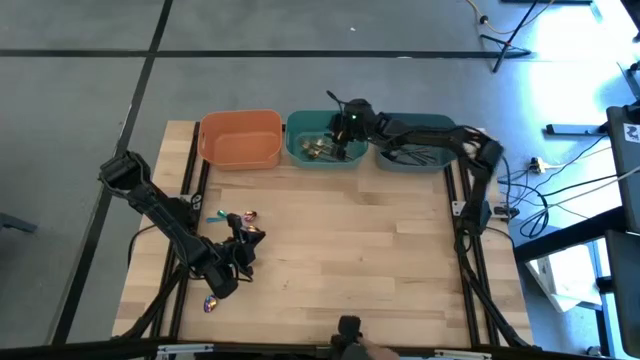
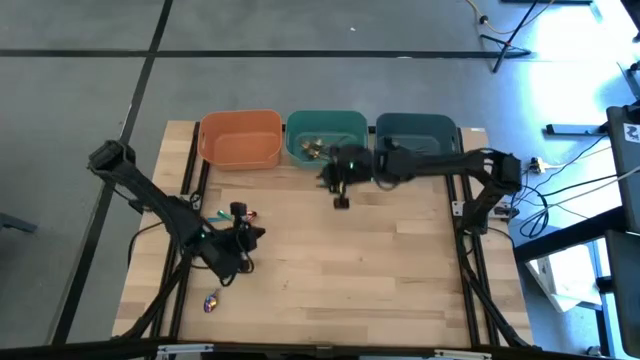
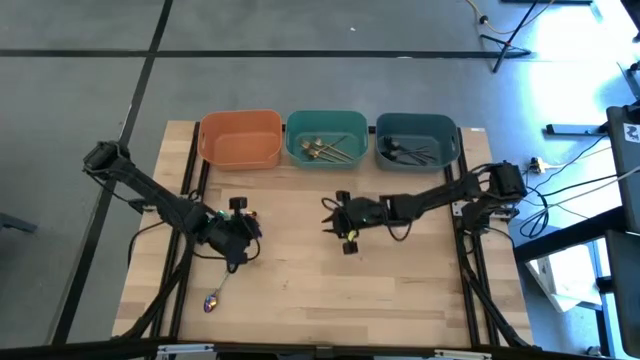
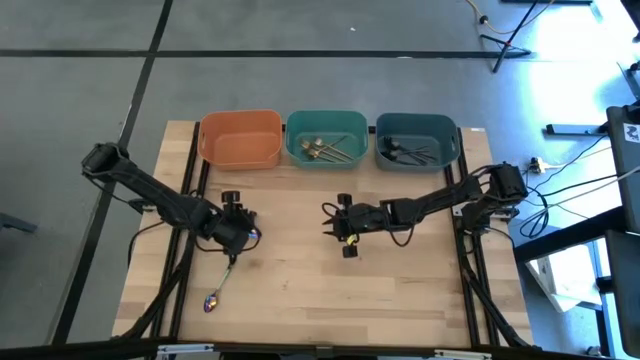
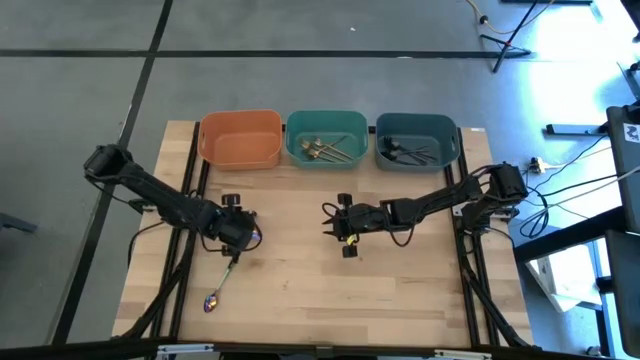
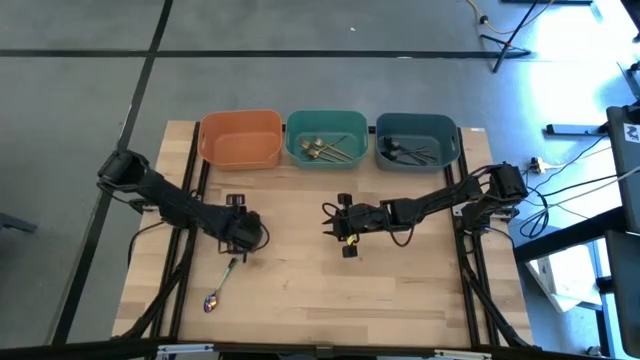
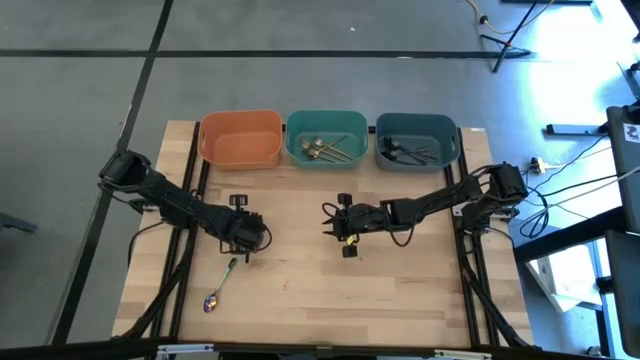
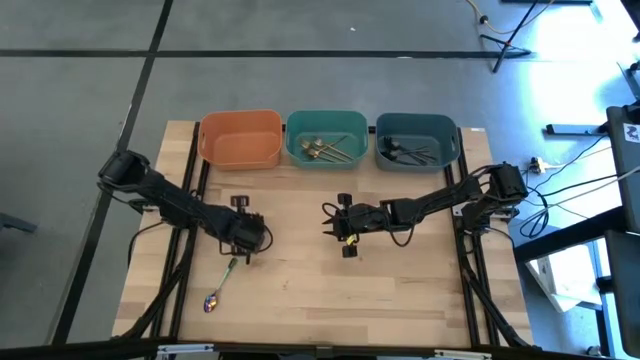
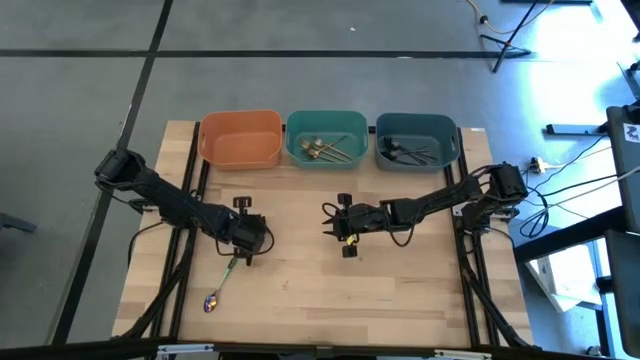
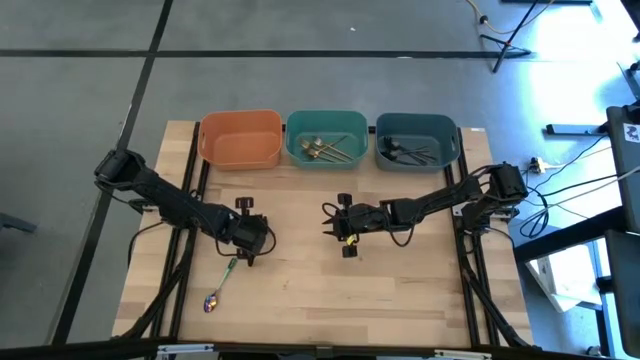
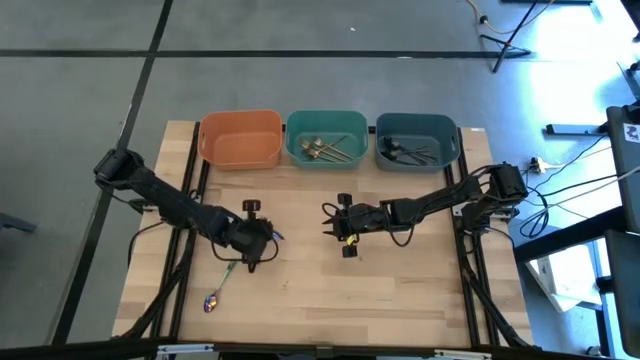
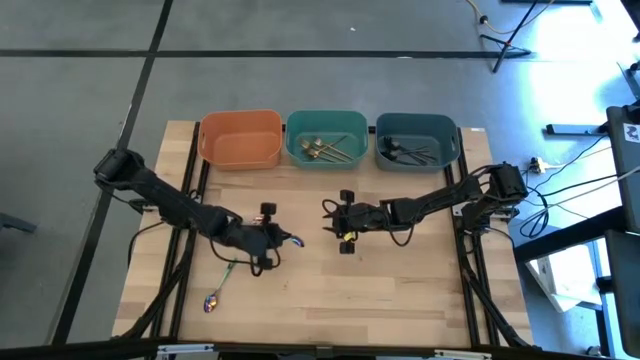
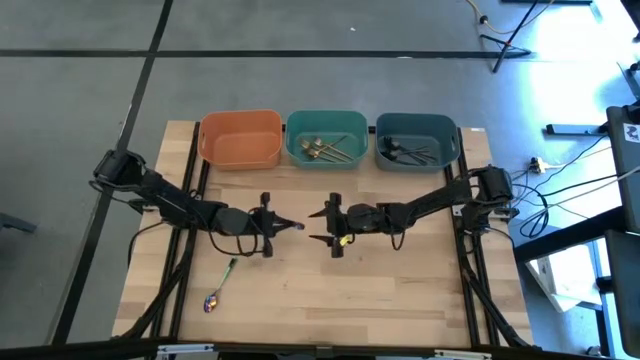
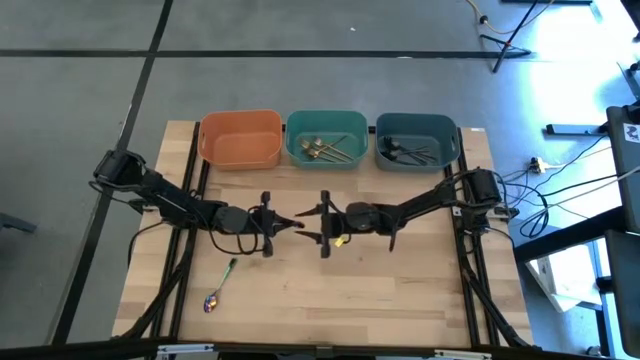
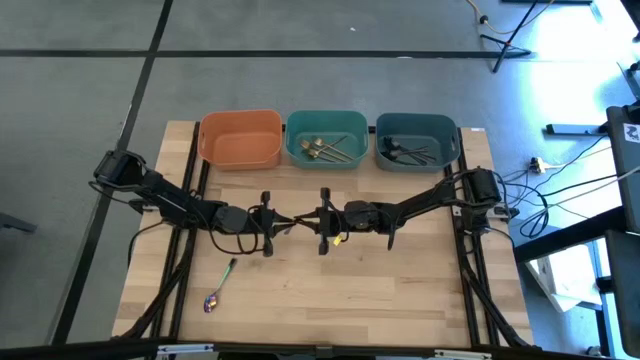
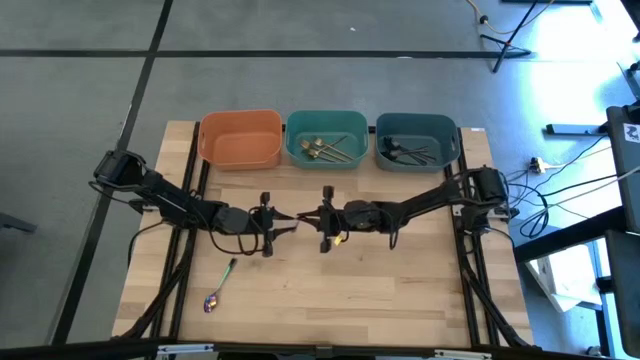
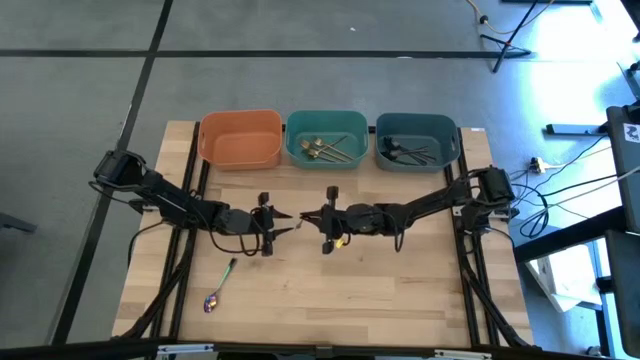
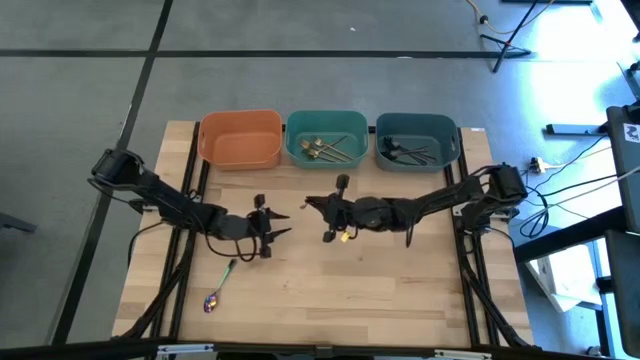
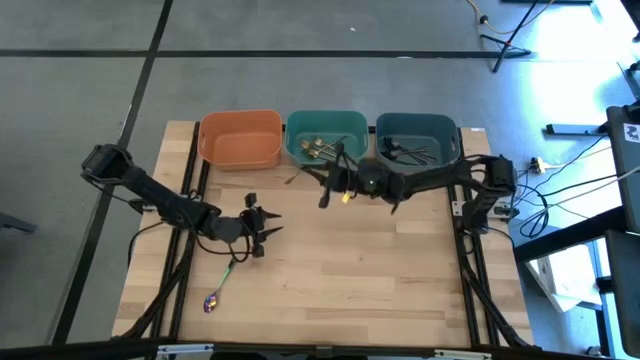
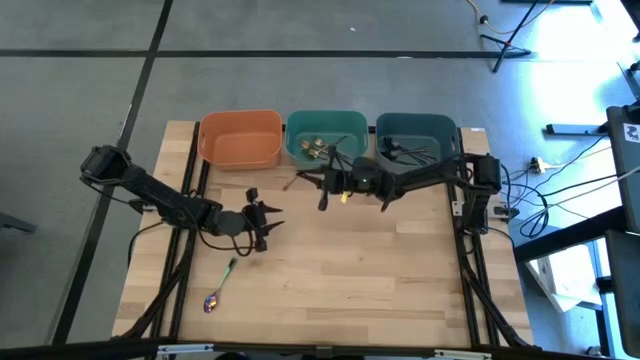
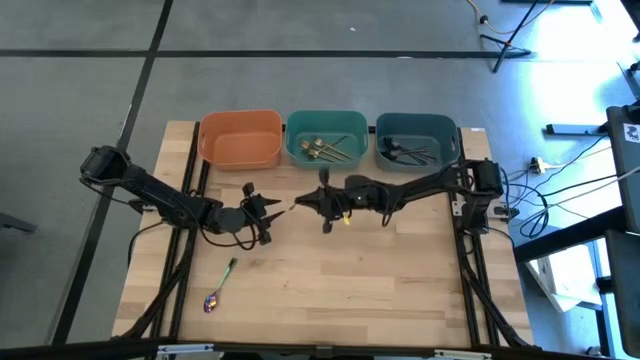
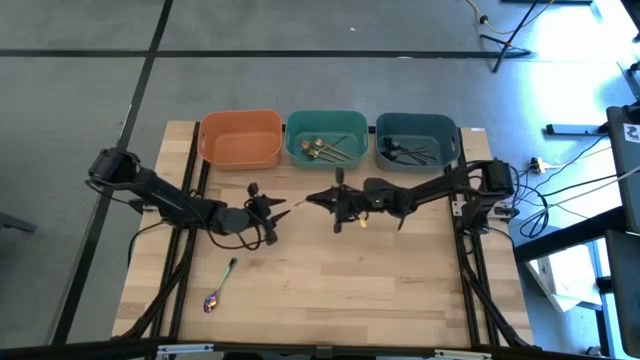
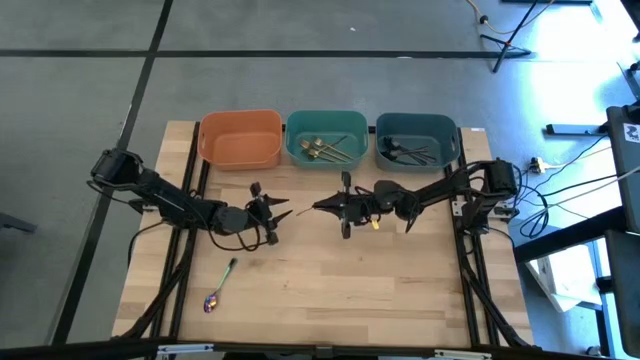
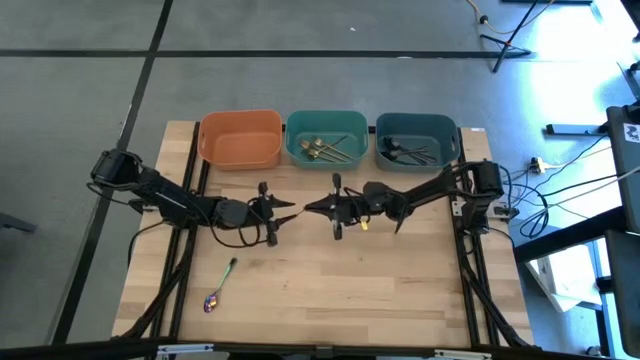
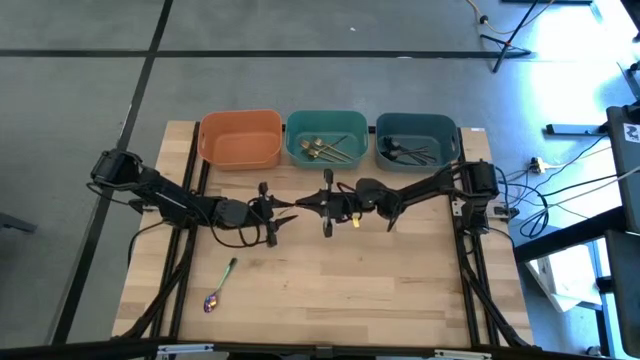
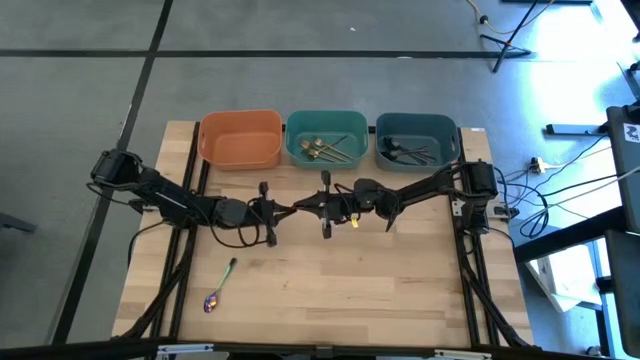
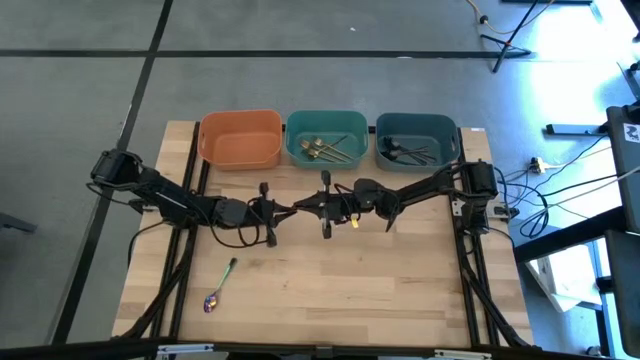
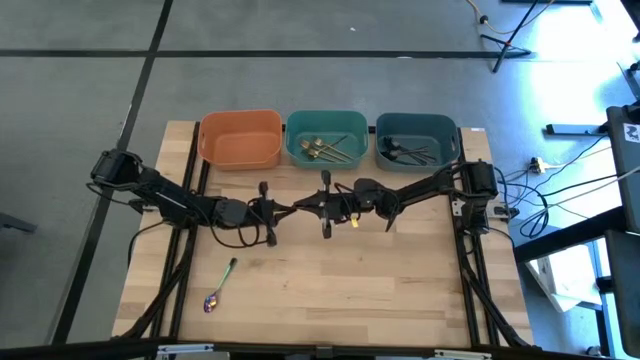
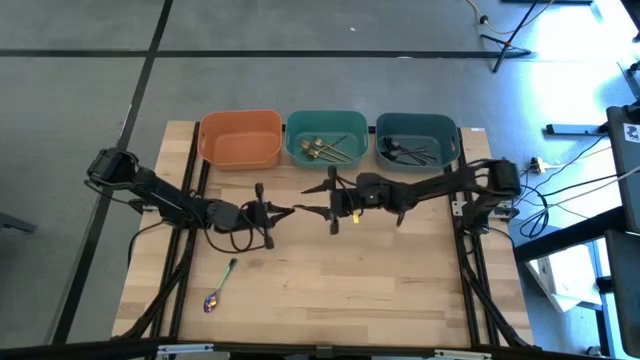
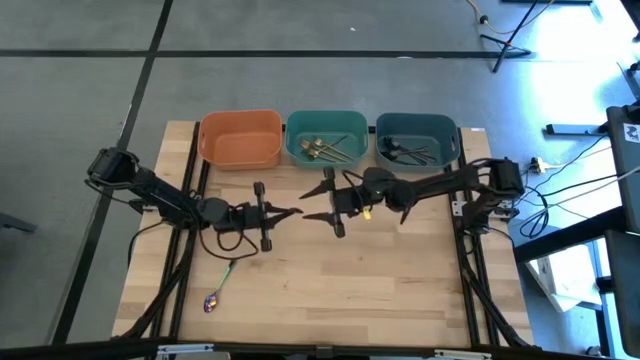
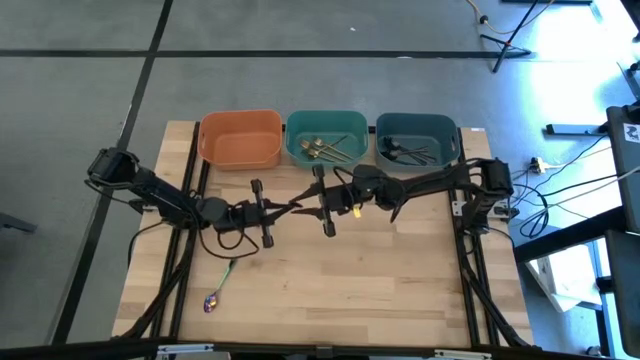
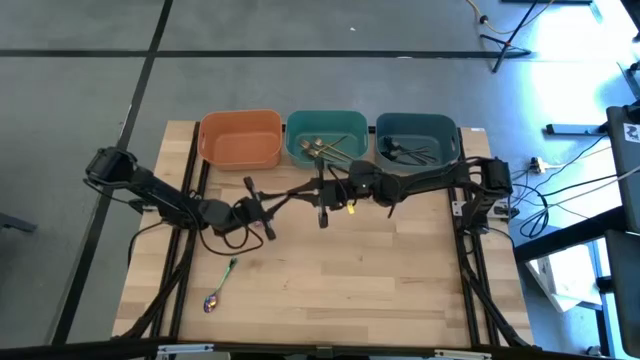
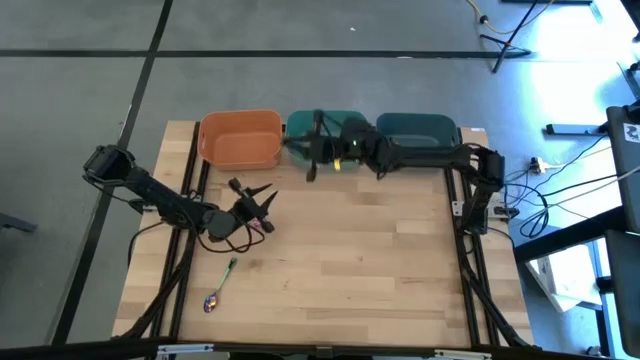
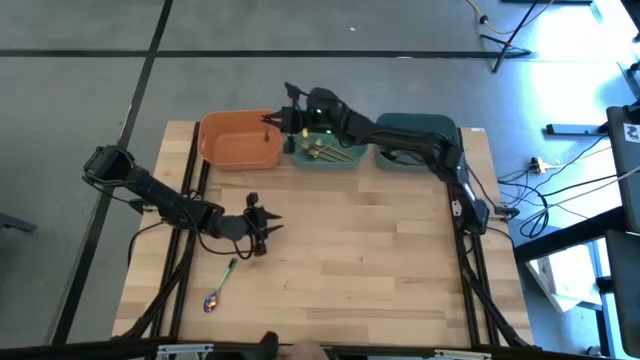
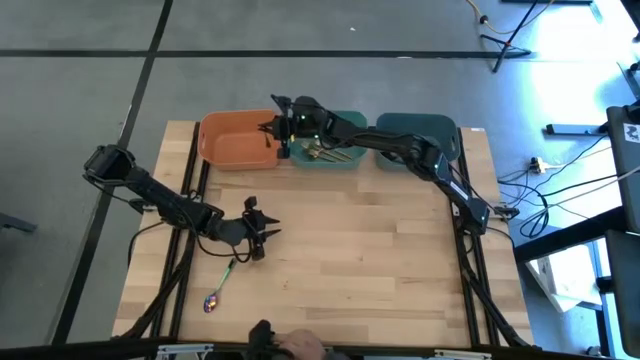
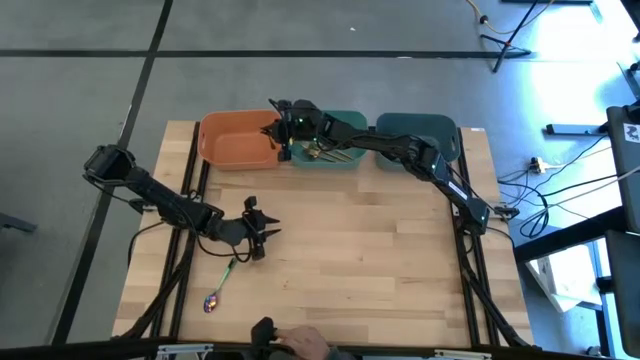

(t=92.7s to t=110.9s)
Task: Sort silverware by color (type)
Put the violet spoon into the orange bin

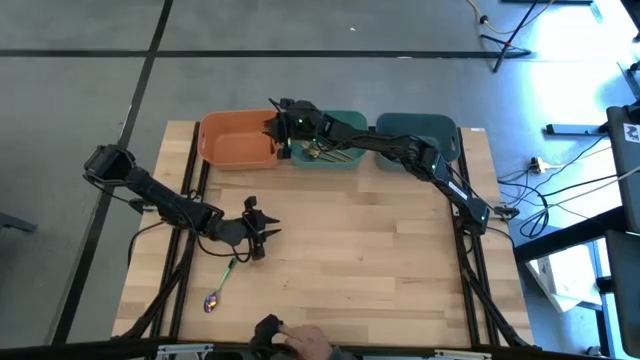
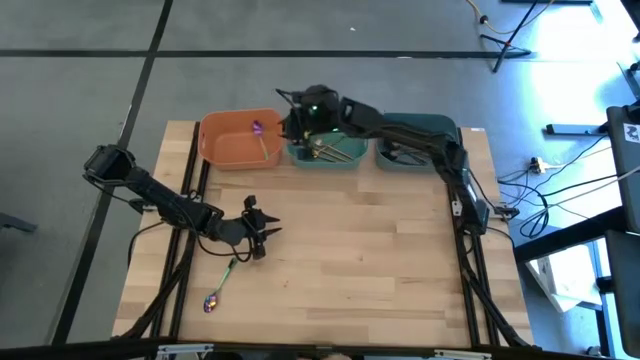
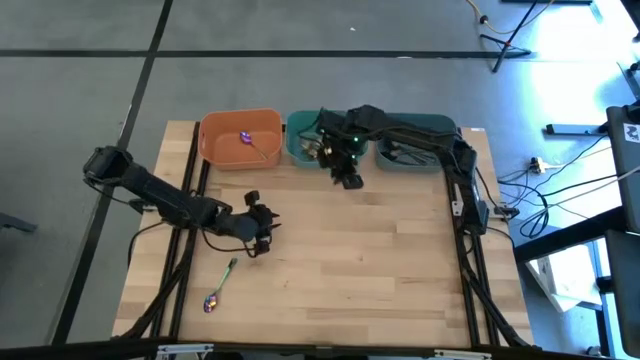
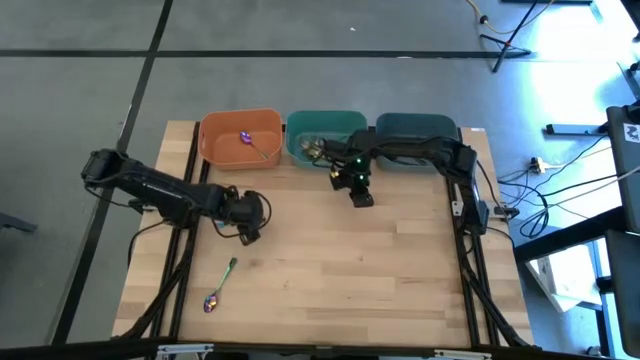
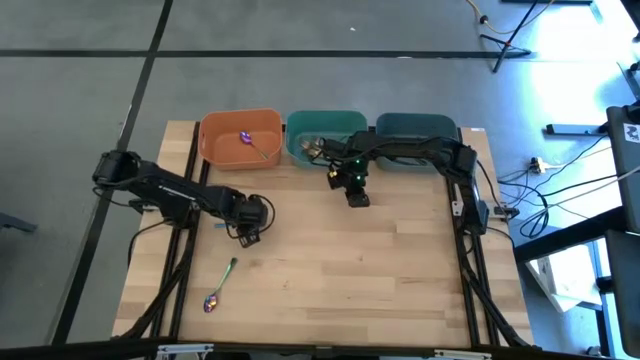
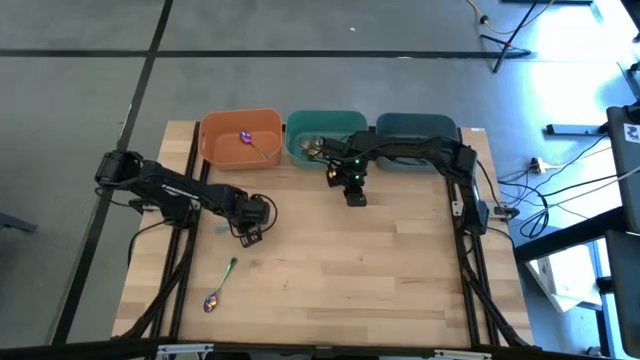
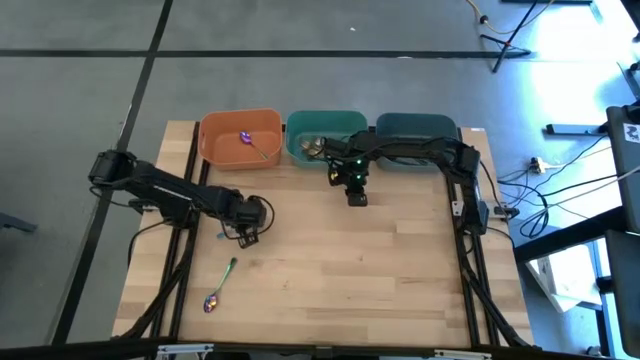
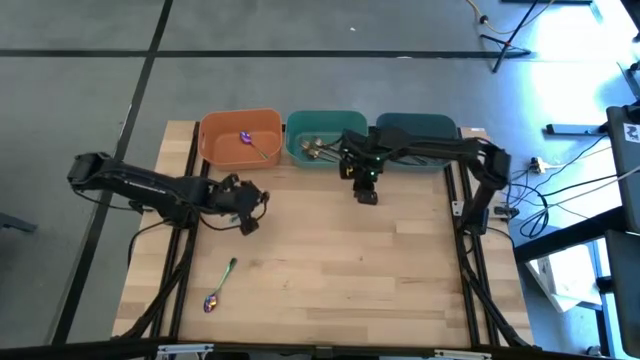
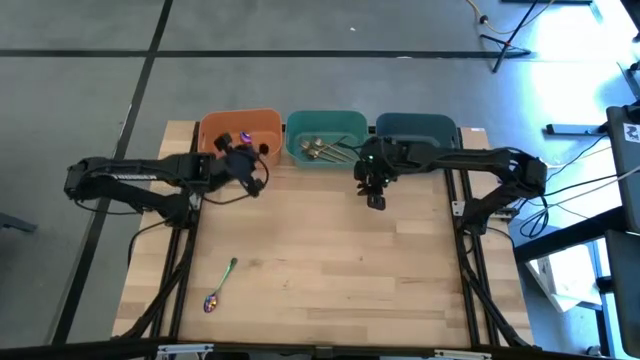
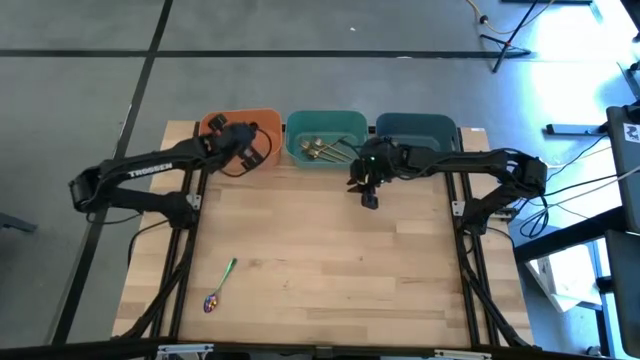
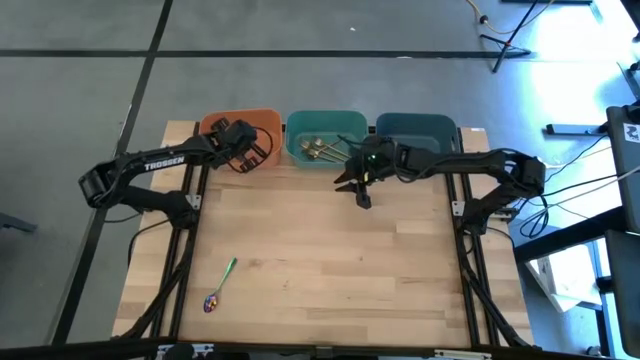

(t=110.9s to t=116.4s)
Put the violet spoon into the orange bin
